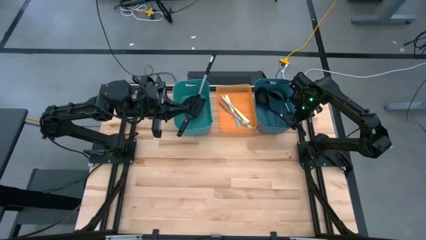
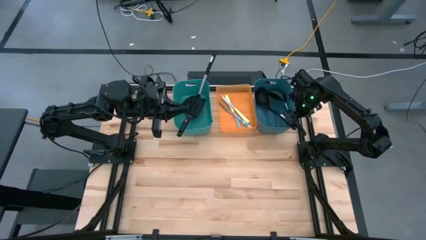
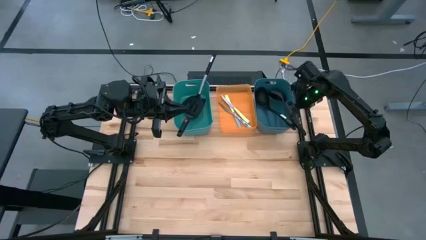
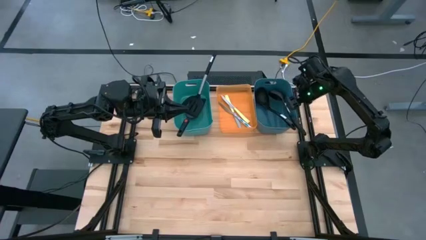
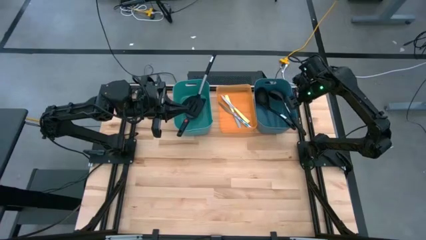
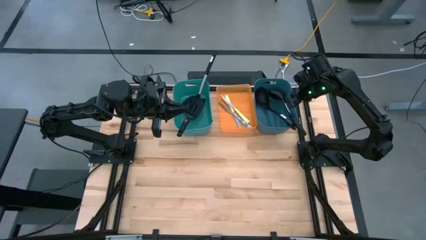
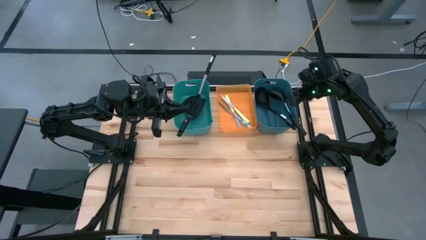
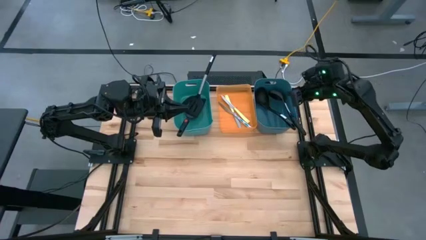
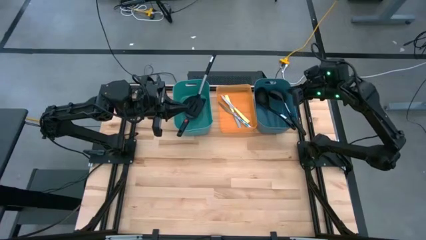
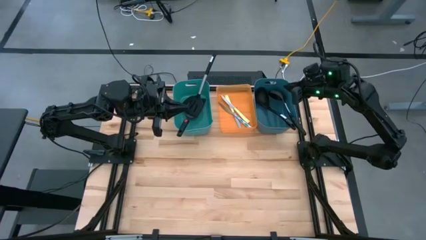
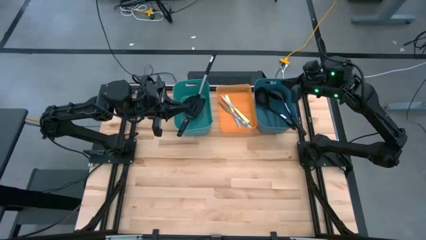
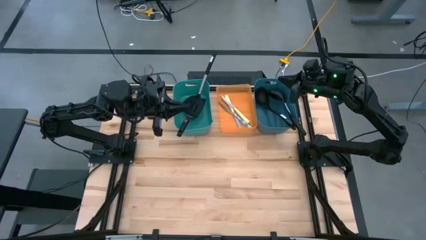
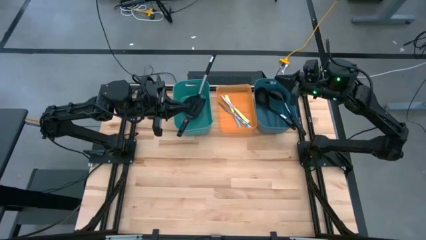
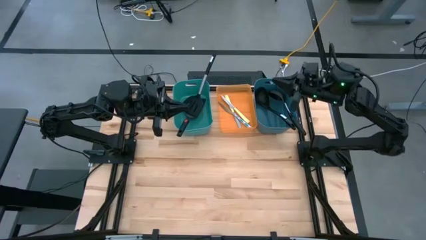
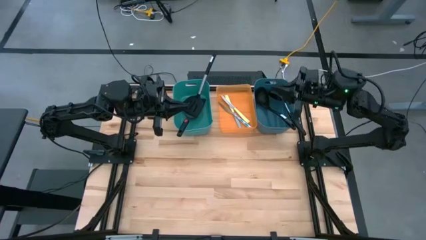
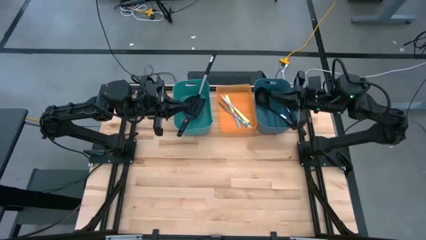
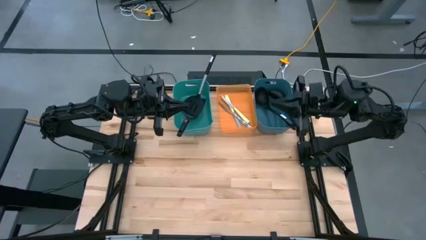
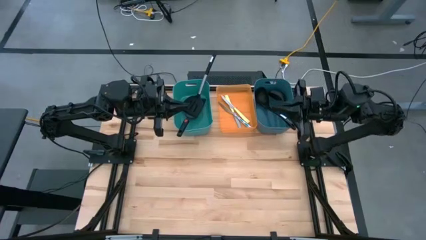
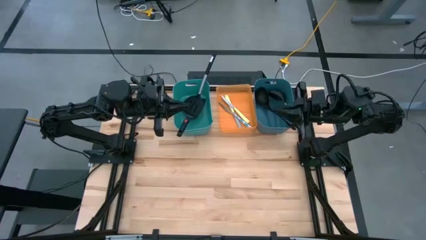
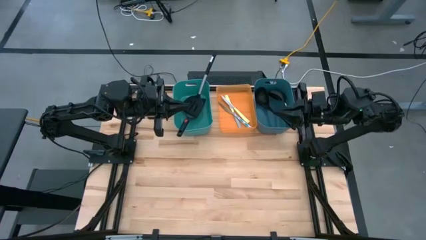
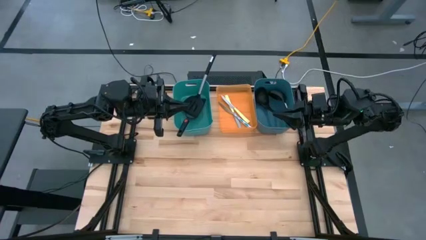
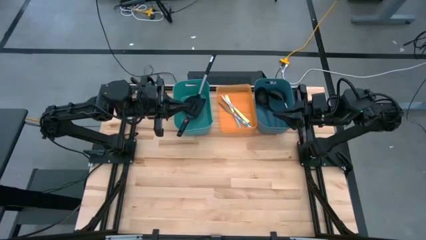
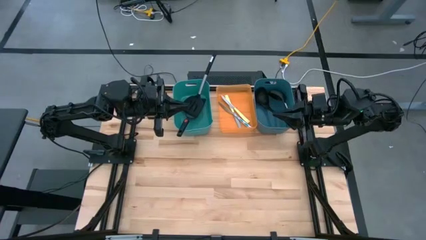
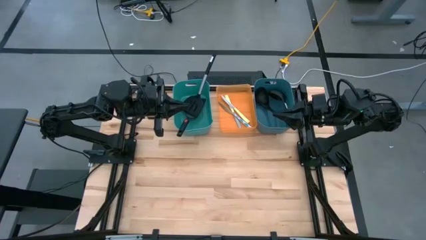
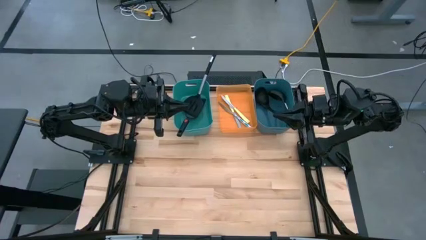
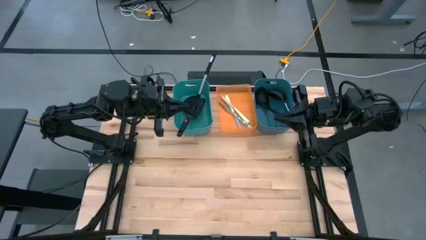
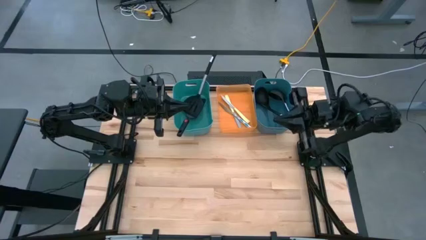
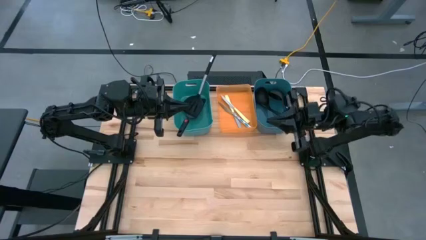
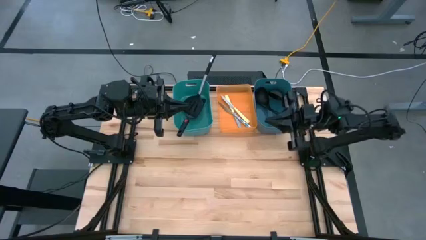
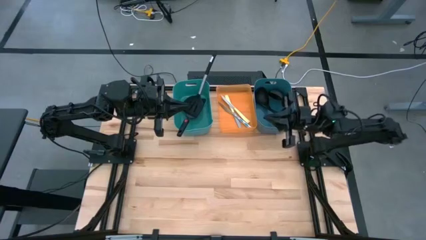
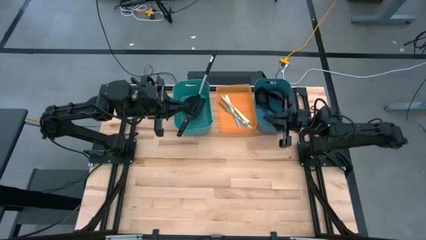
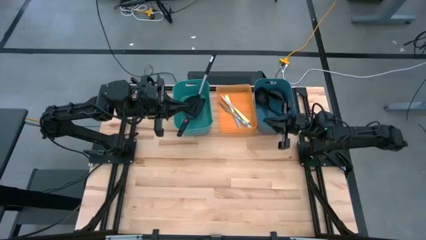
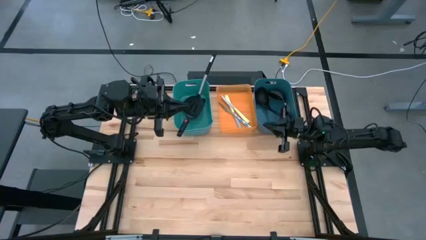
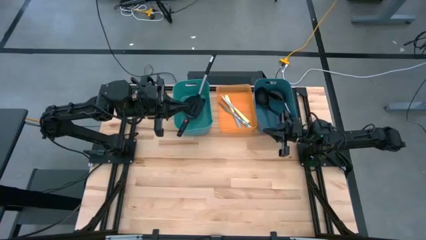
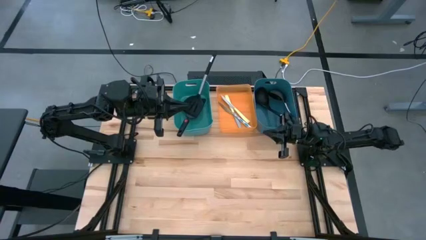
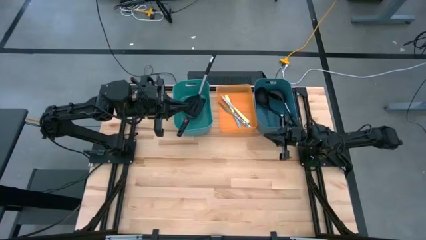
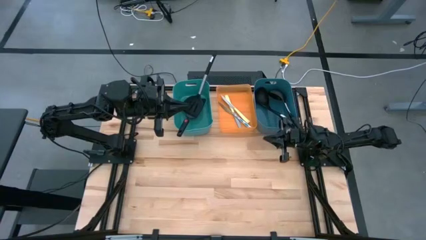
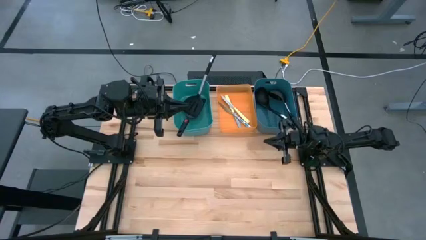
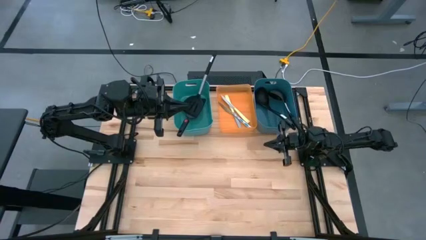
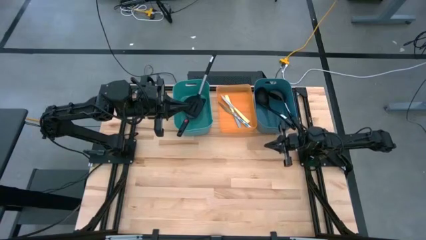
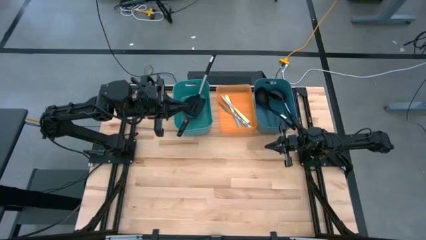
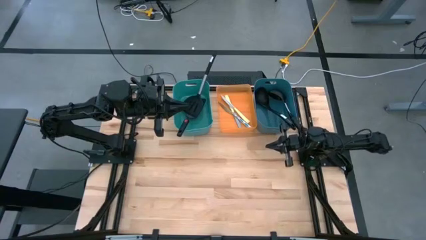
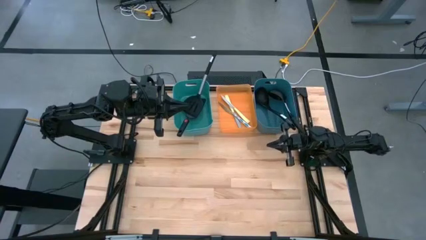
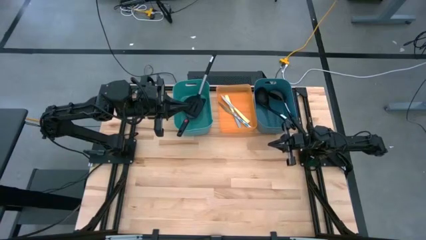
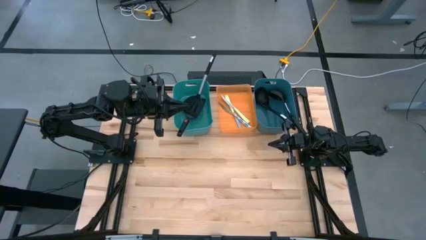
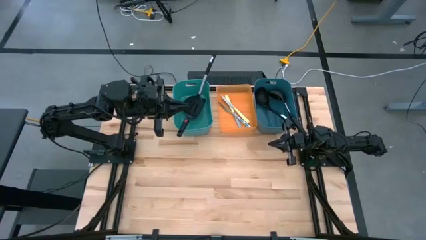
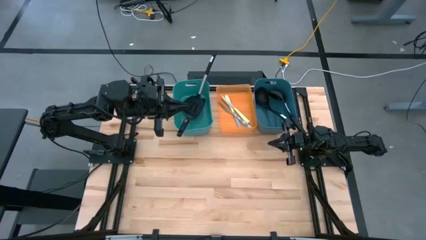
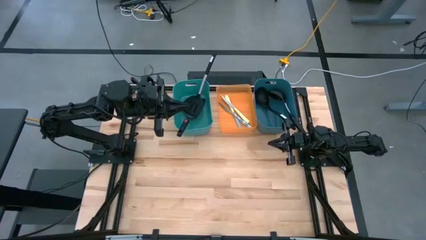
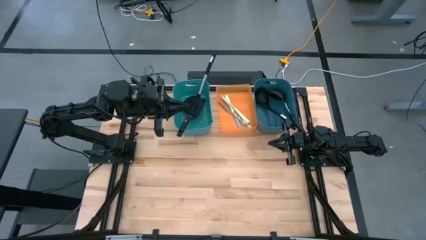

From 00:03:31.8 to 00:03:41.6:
Task: Pick & Place Kitchen Items
Return to Home Position

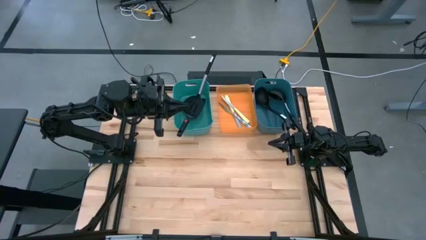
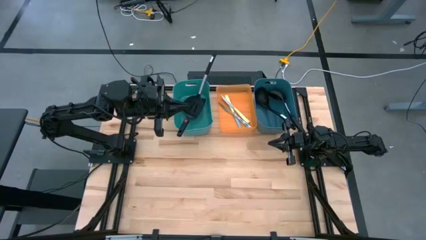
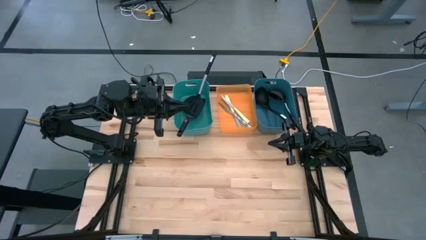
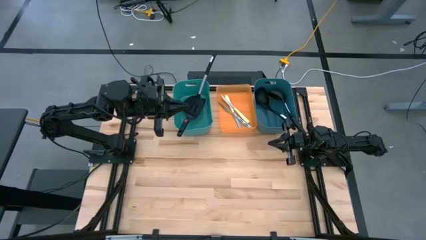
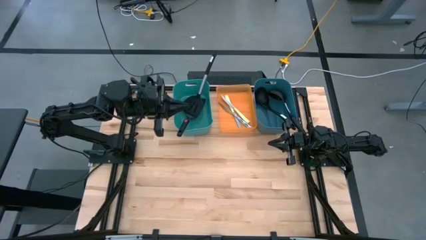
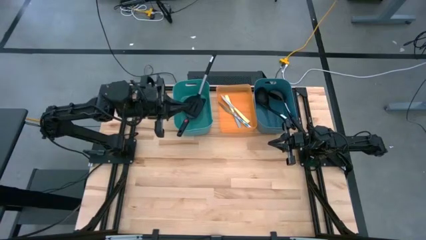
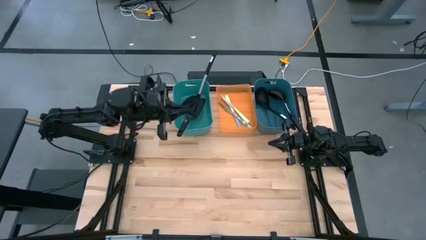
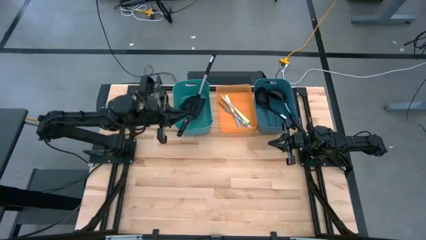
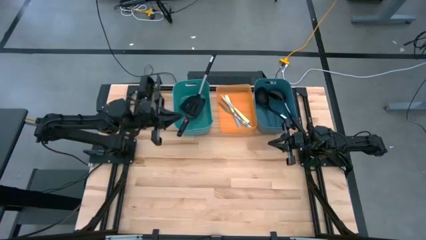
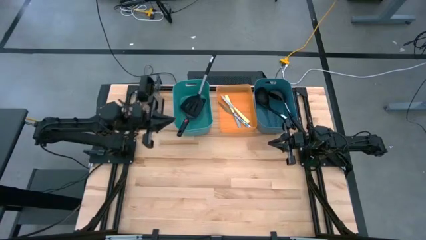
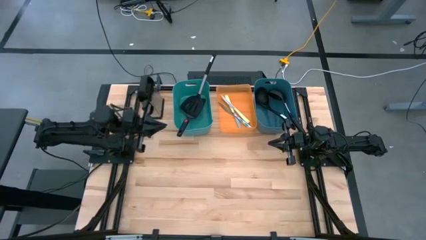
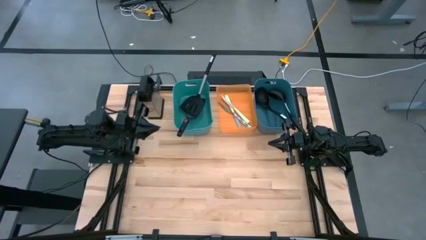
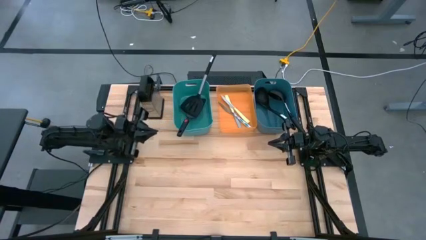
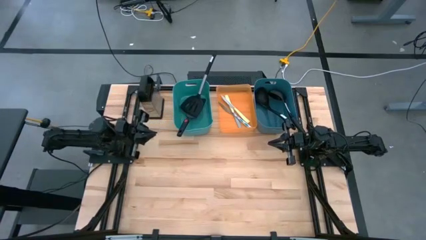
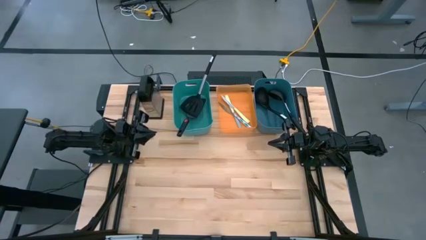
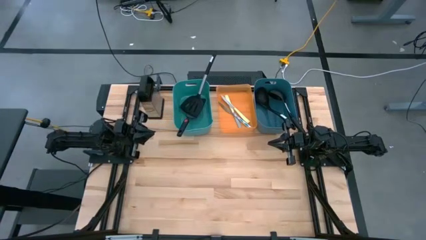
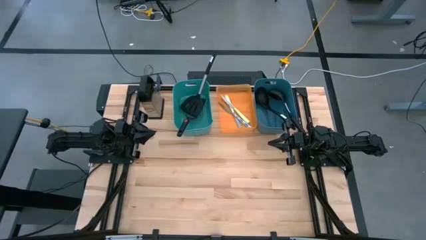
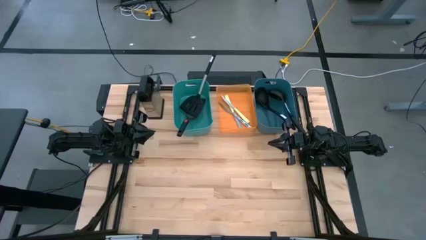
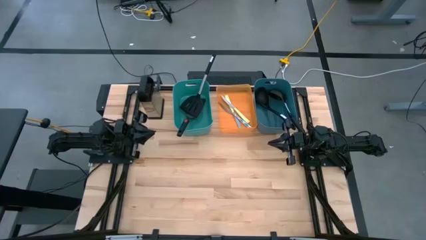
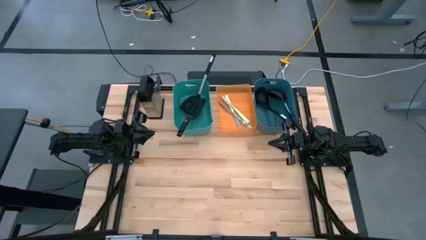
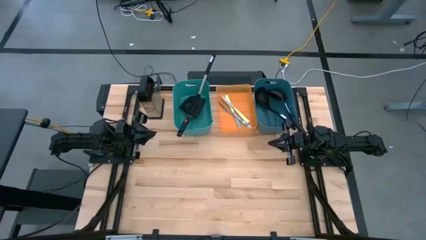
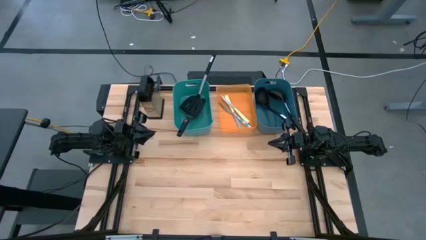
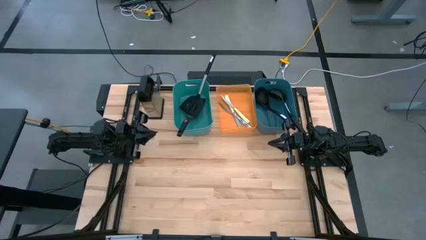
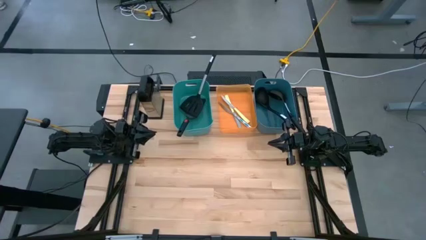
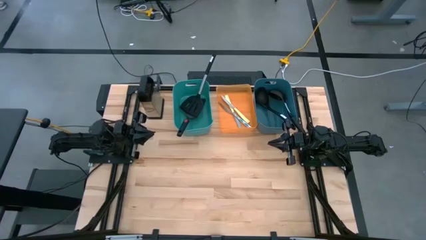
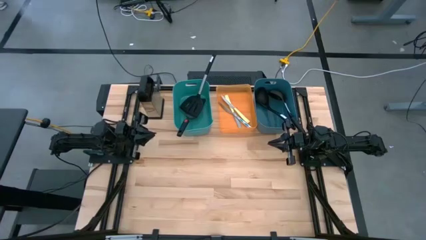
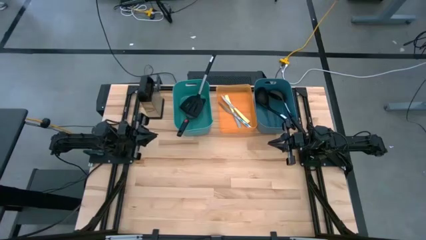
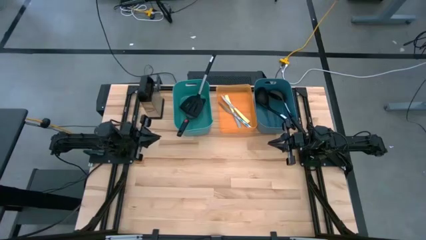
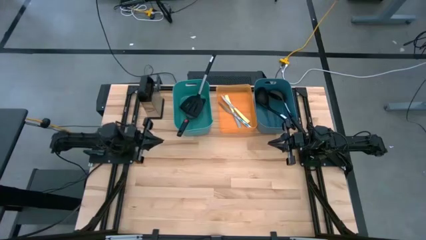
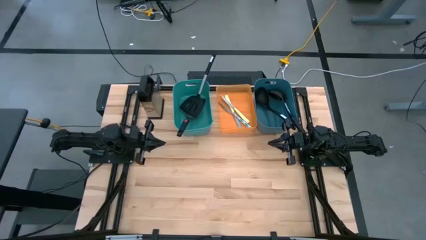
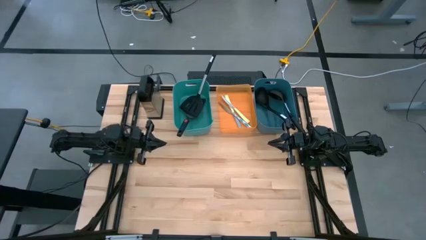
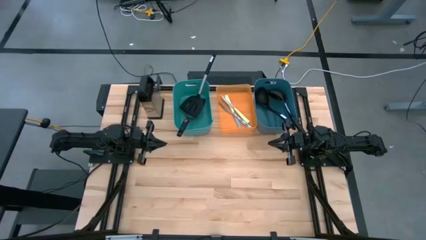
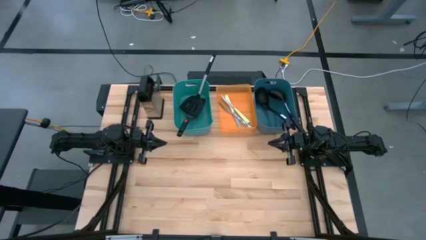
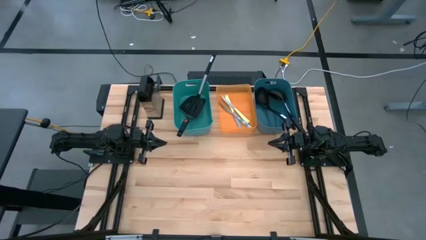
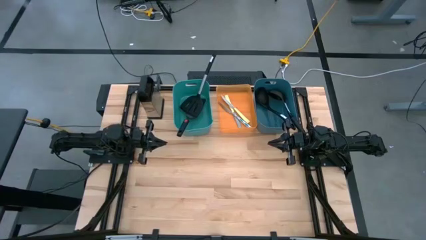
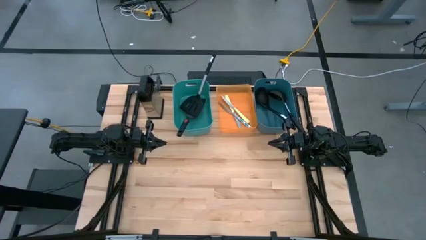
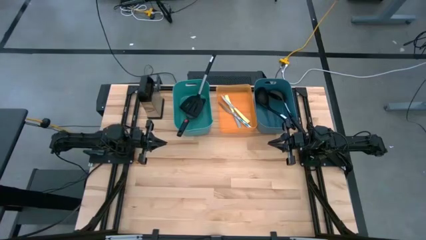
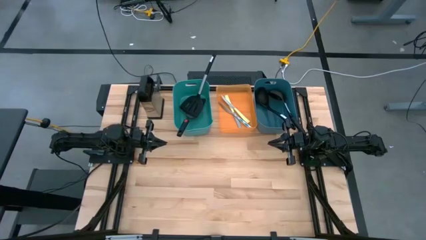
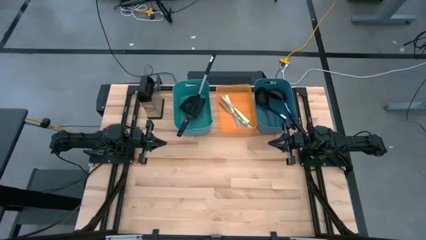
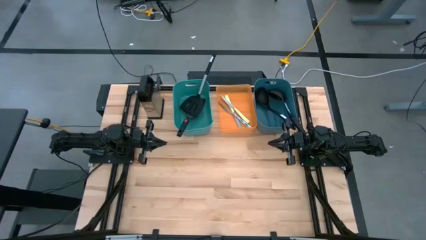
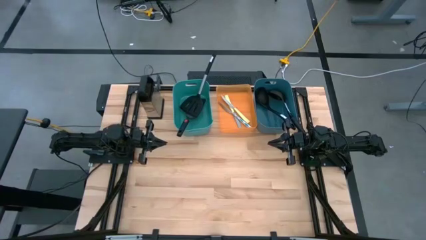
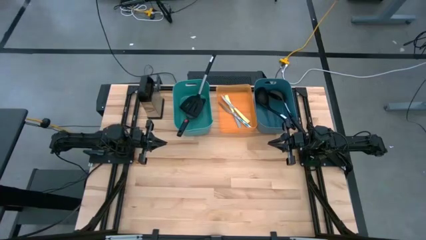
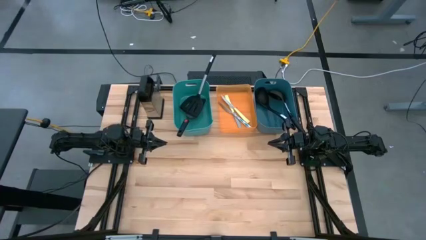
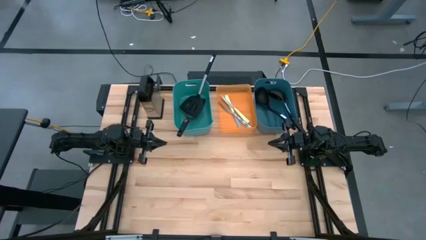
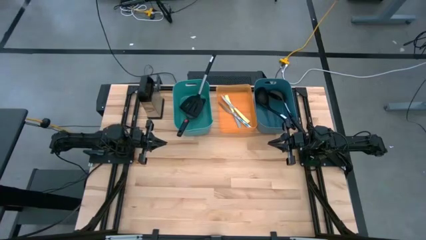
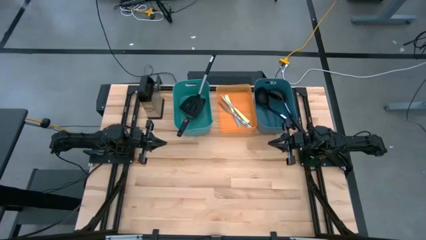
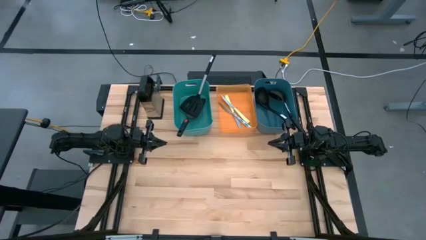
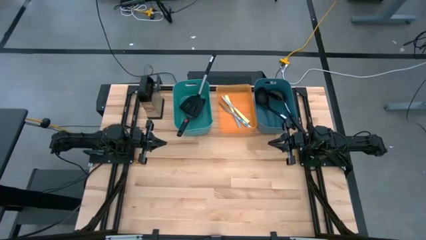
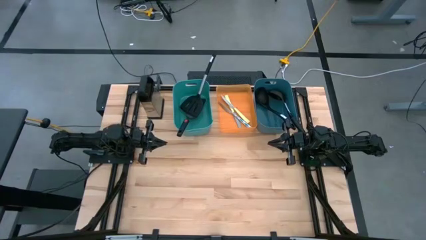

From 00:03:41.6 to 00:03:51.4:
Return to Home Position
